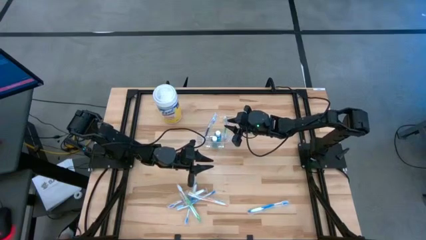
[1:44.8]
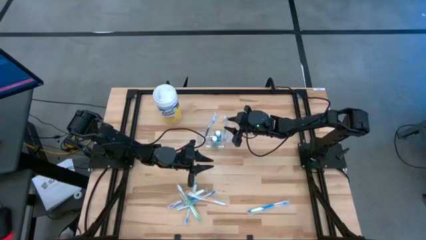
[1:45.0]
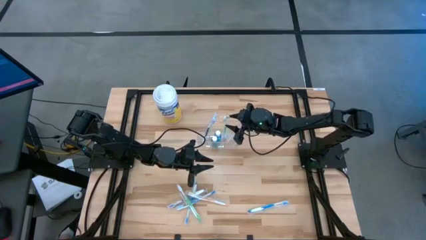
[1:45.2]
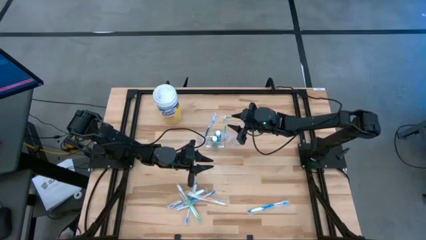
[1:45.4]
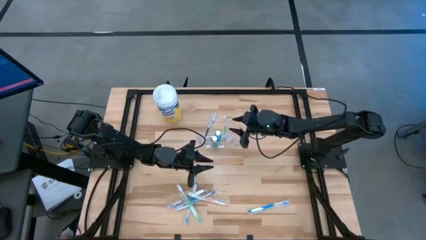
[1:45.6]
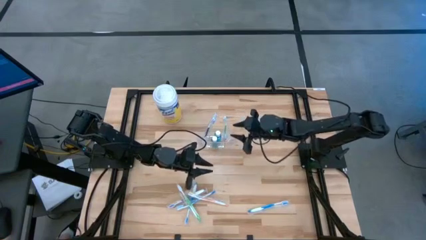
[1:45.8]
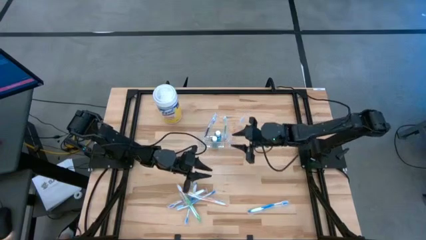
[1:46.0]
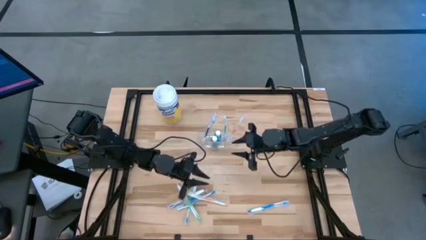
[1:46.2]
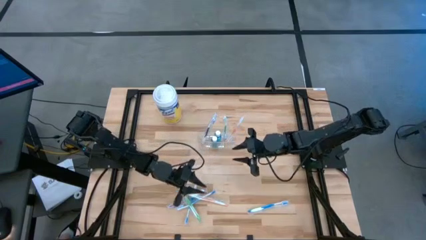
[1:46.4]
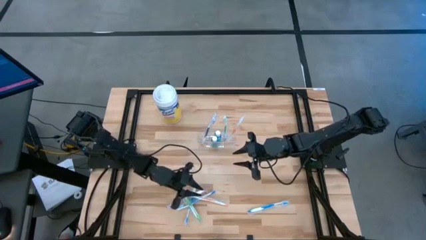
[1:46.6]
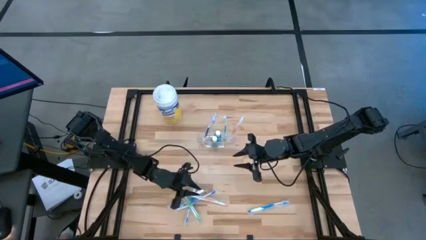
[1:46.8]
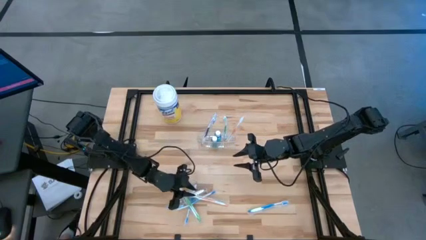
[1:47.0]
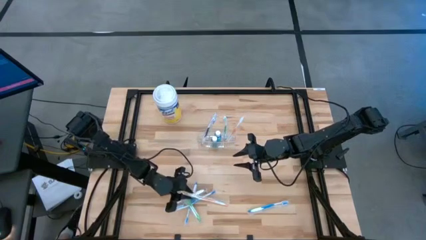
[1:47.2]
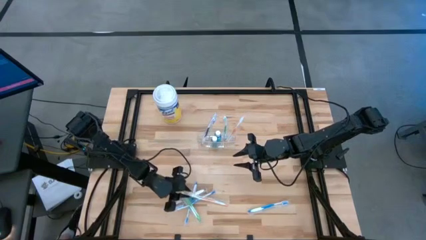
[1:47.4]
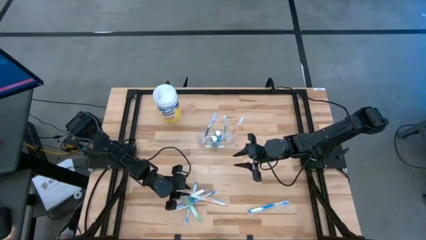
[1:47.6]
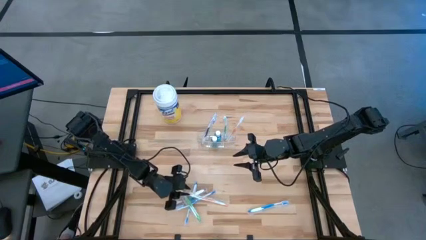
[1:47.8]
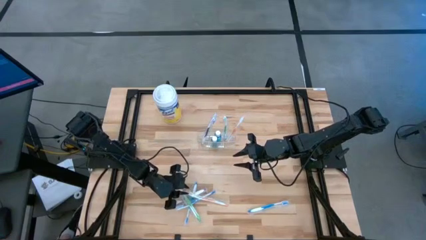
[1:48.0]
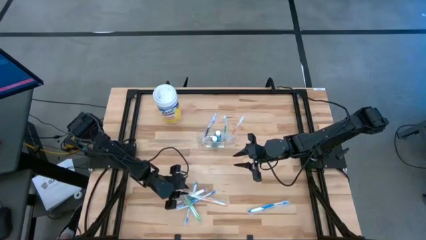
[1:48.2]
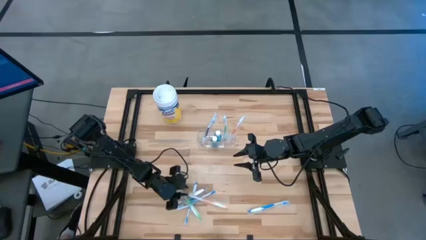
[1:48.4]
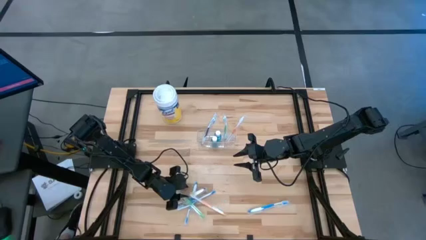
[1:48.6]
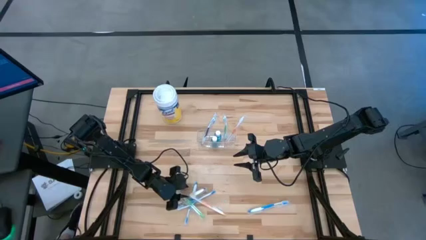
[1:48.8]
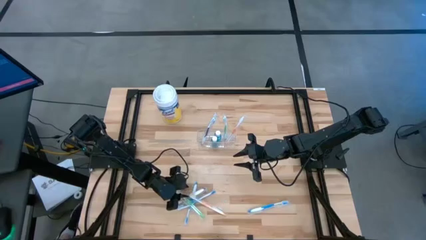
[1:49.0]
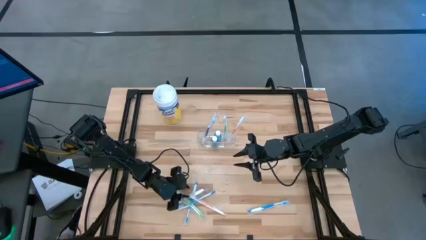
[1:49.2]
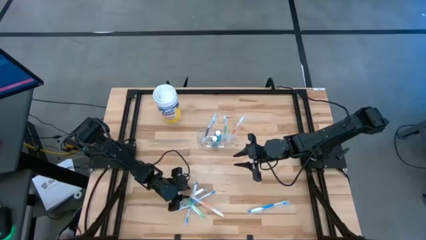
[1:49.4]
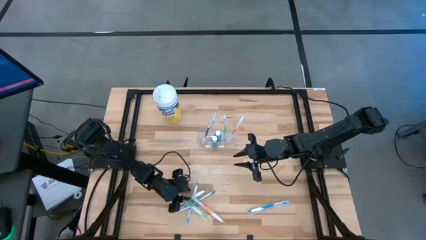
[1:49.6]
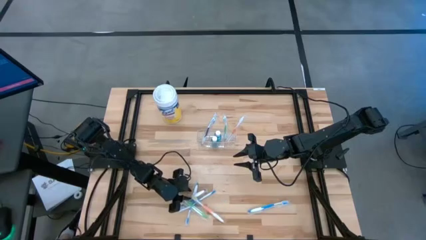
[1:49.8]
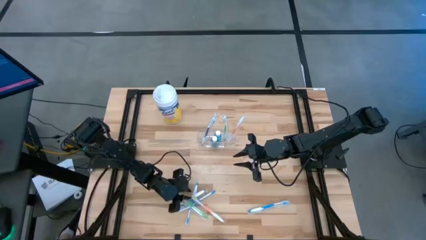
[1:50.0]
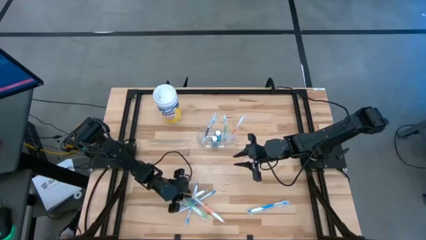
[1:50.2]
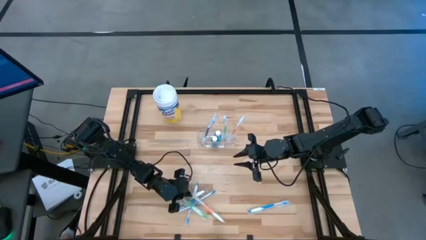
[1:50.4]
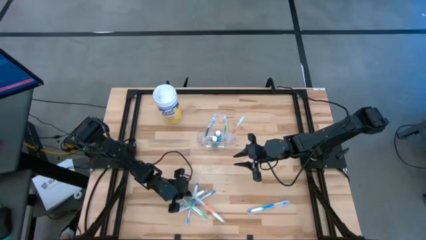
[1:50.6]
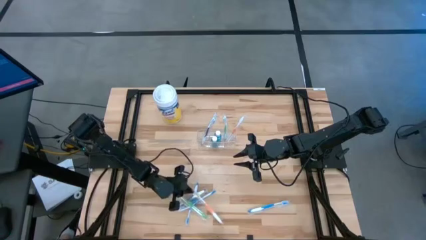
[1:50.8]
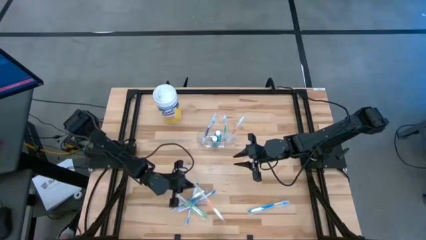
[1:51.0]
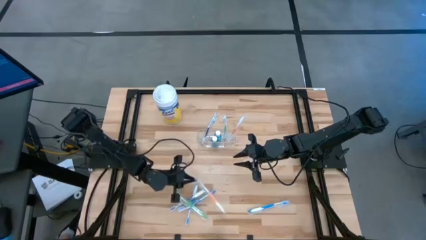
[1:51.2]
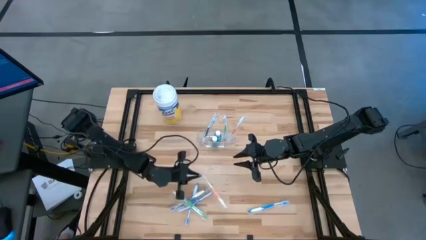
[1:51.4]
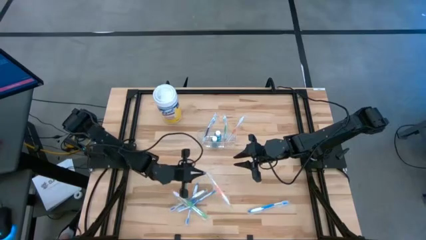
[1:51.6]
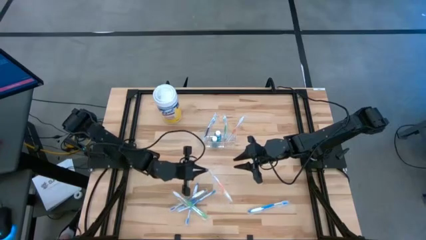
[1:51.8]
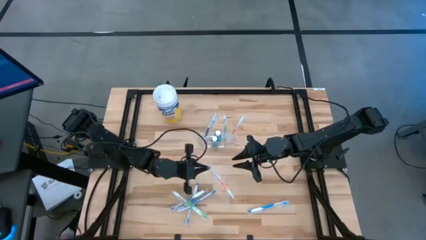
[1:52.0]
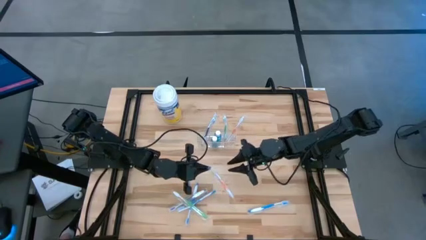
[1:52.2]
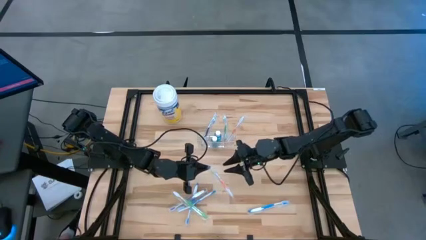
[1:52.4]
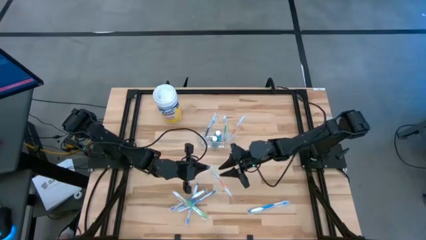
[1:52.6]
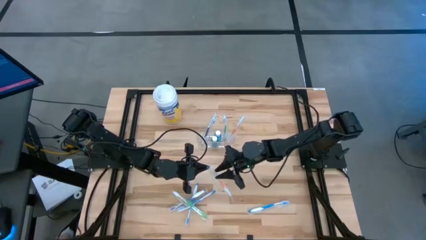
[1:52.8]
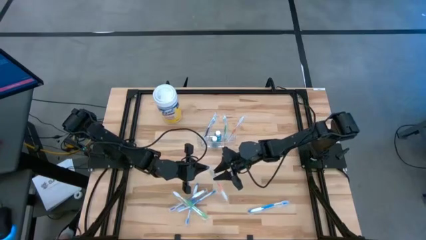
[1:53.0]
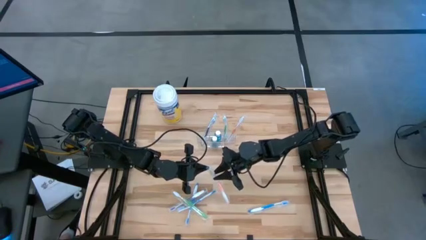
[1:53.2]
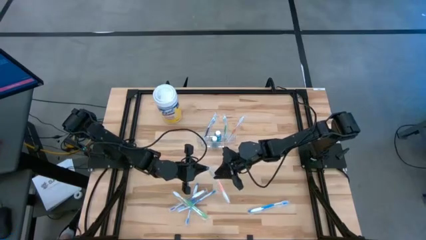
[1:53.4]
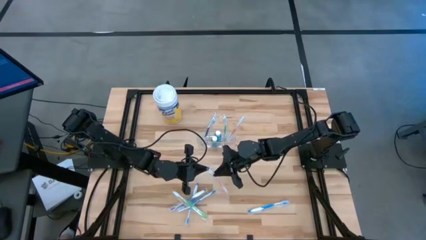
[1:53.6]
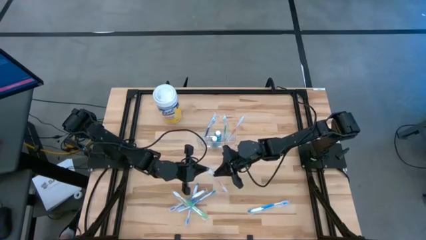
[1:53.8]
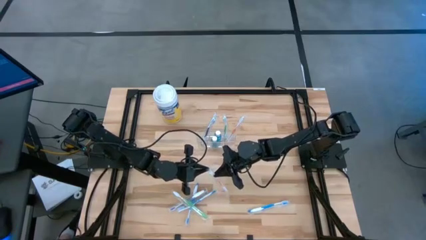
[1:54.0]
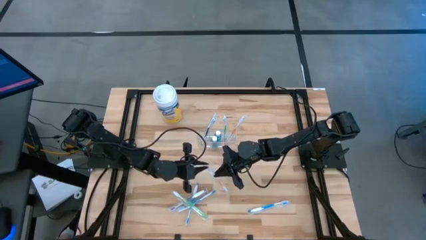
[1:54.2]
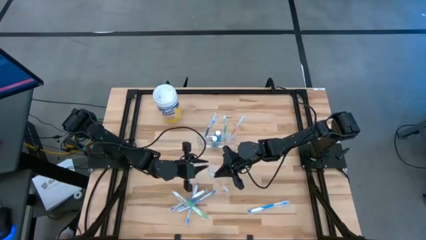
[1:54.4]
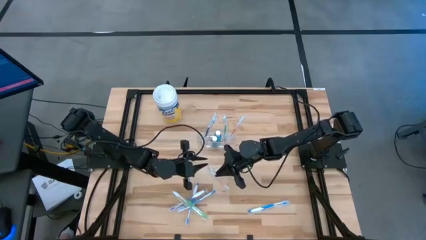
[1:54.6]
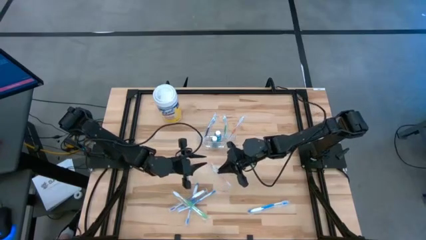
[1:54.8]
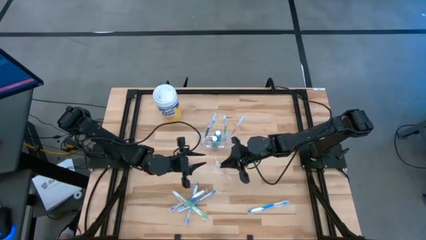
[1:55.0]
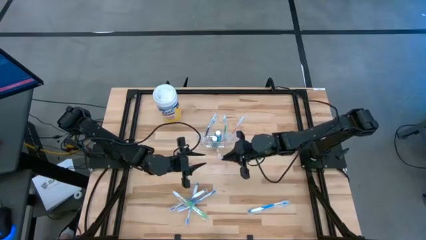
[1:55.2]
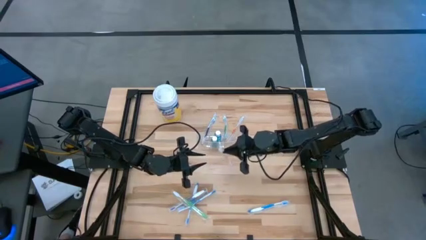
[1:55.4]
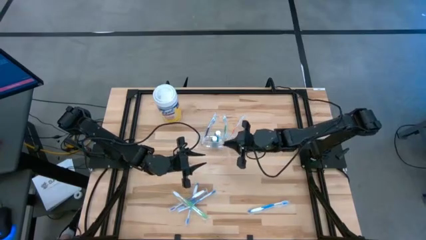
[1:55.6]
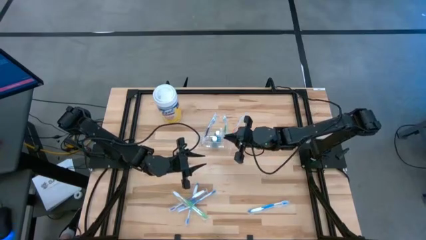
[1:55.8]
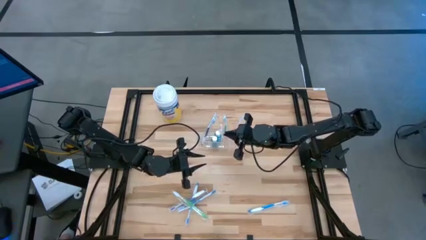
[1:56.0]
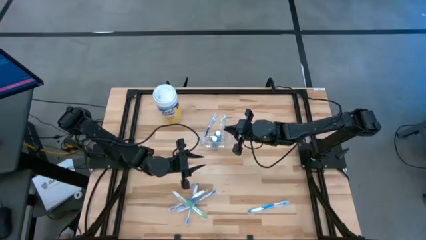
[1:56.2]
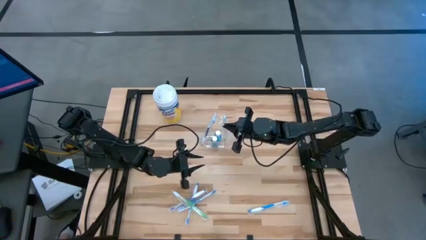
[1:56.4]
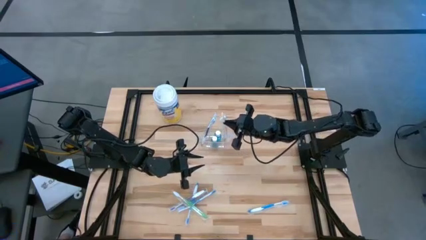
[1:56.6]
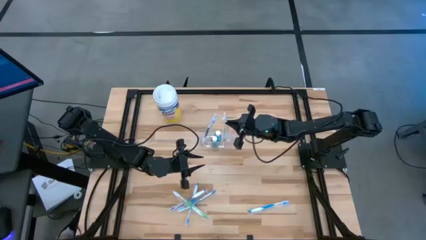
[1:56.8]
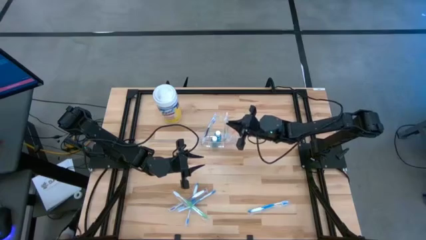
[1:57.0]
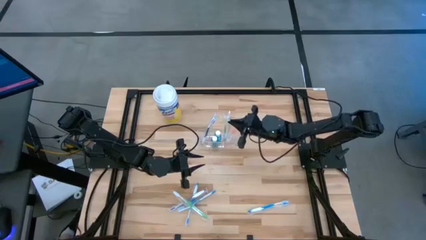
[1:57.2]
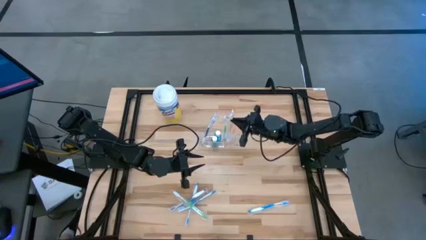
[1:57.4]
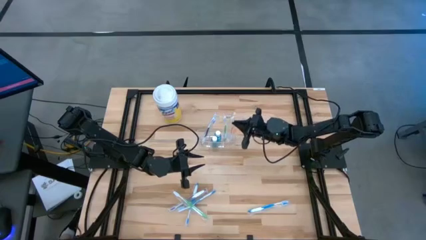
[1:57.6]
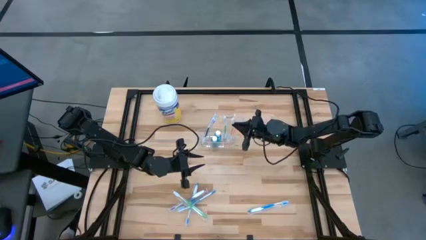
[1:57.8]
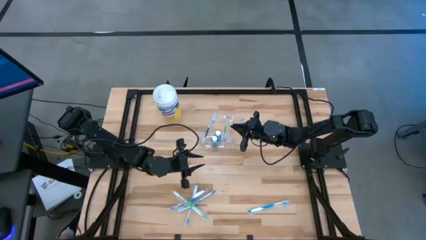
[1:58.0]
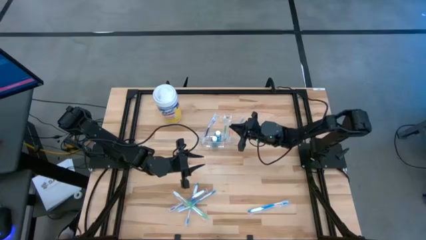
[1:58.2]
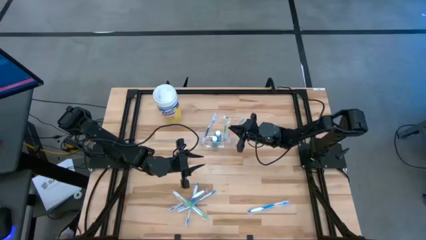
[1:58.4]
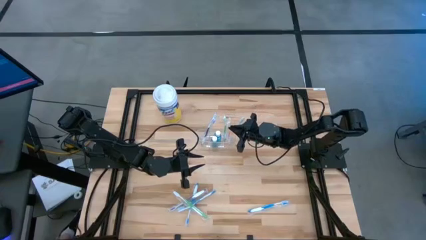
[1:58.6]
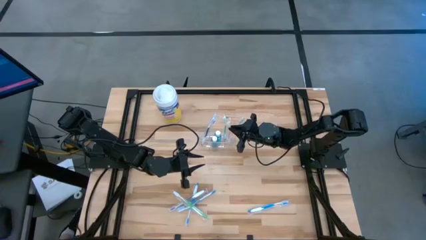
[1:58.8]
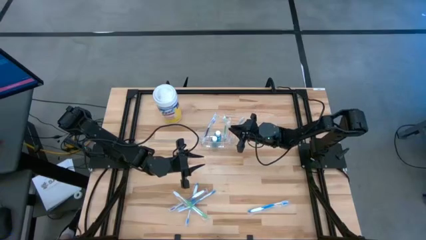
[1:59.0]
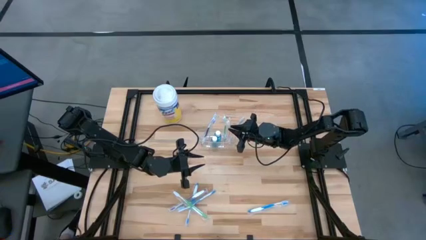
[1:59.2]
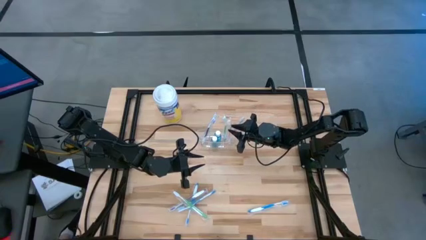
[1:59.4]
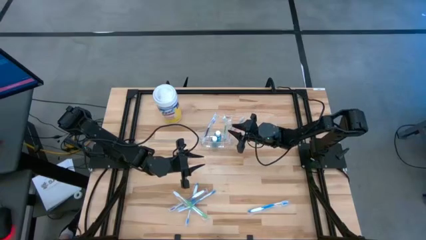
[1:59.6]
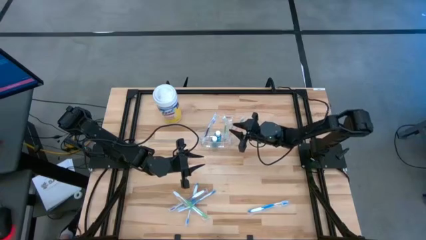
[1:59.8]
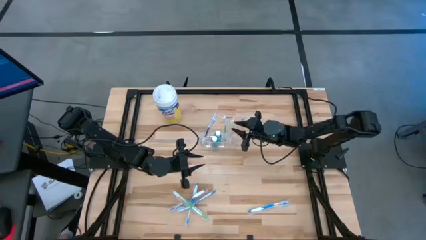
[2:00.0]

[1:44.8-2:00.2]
Task: Pick & Place toothbrushing station
Put the orange toothbrush into the transparent organizer
